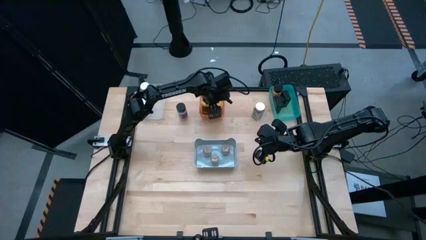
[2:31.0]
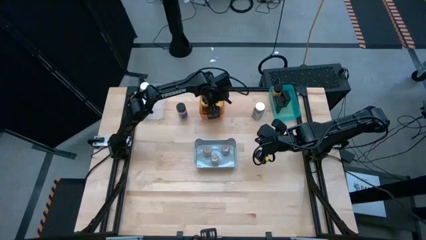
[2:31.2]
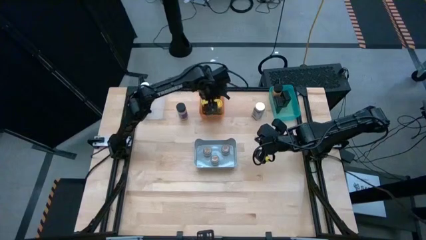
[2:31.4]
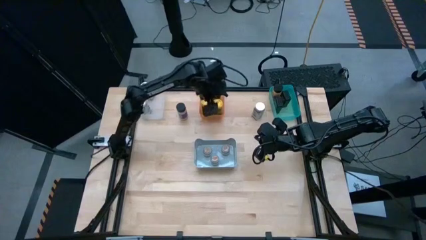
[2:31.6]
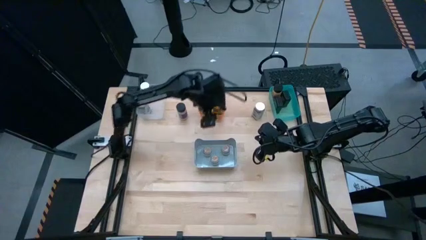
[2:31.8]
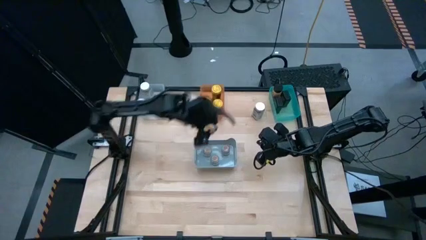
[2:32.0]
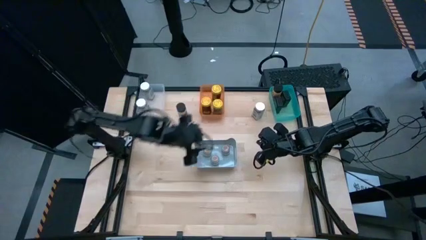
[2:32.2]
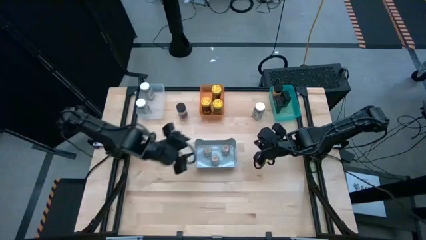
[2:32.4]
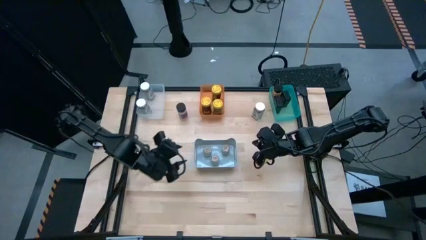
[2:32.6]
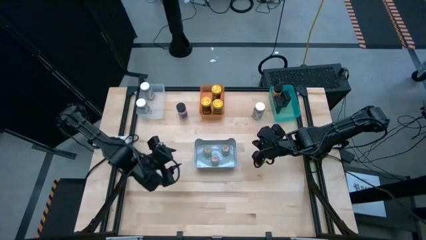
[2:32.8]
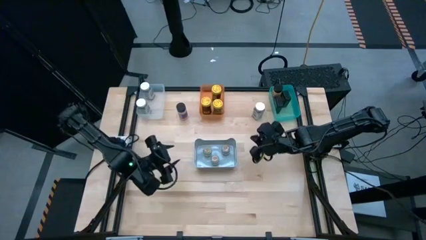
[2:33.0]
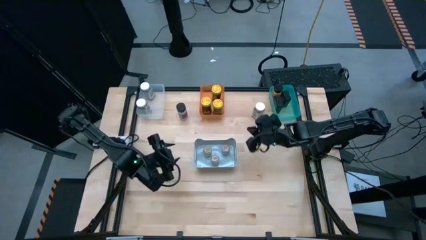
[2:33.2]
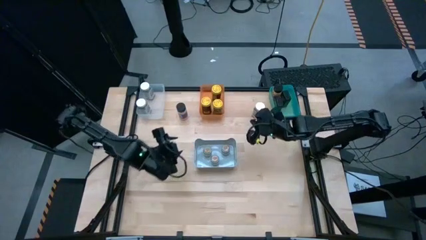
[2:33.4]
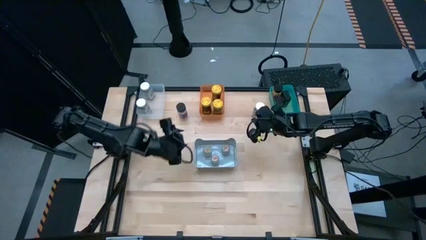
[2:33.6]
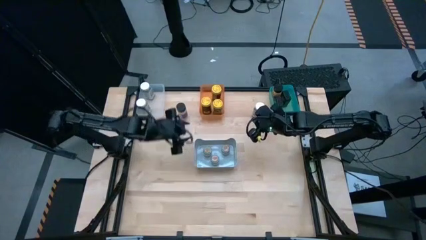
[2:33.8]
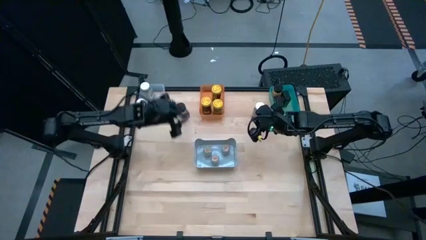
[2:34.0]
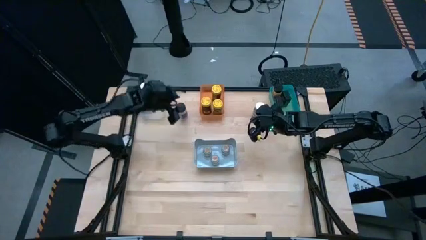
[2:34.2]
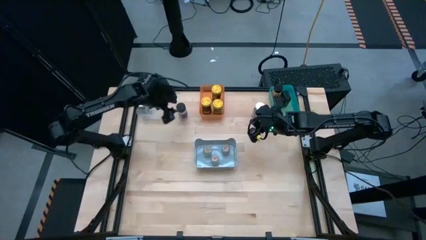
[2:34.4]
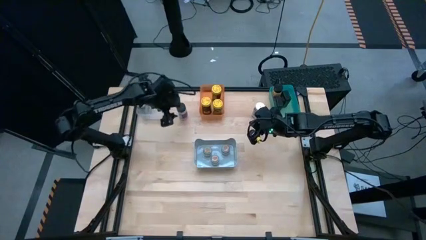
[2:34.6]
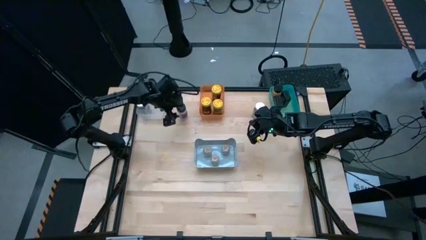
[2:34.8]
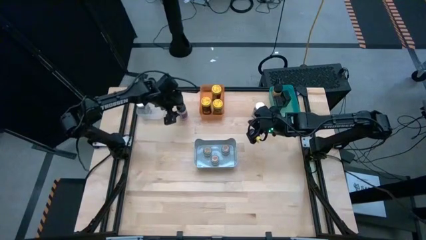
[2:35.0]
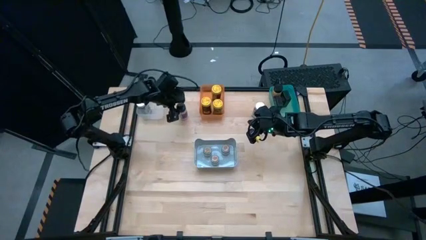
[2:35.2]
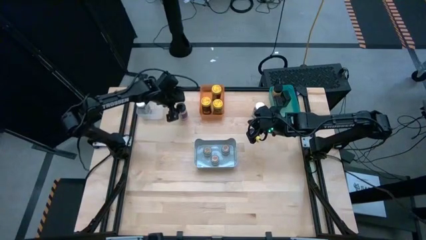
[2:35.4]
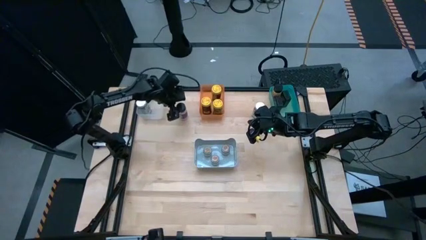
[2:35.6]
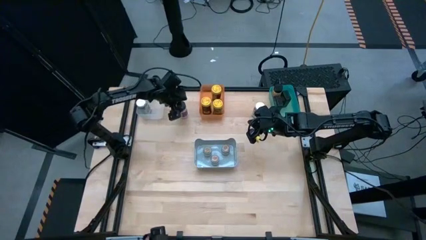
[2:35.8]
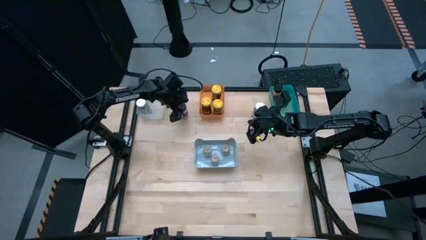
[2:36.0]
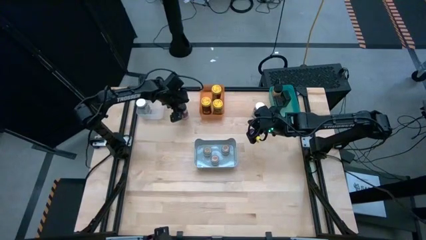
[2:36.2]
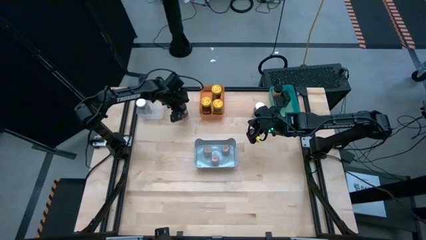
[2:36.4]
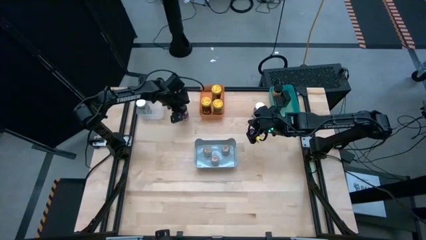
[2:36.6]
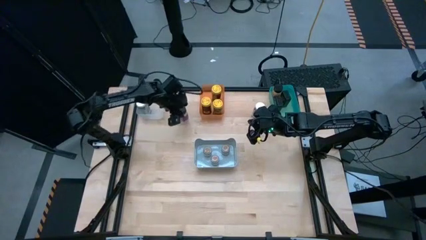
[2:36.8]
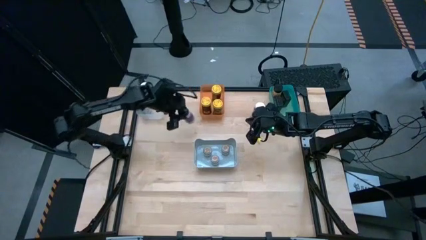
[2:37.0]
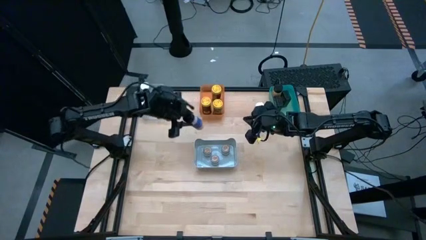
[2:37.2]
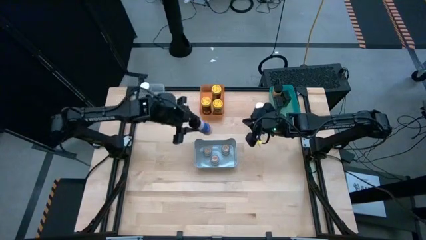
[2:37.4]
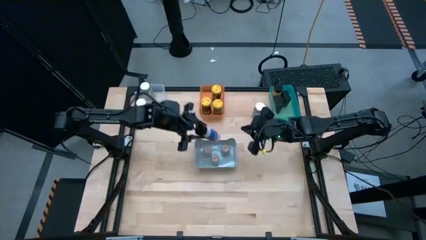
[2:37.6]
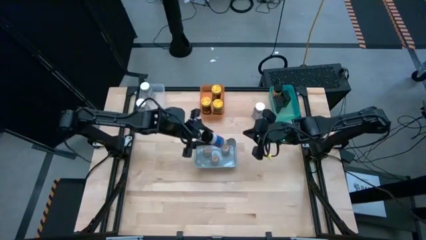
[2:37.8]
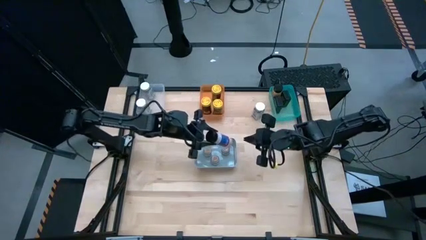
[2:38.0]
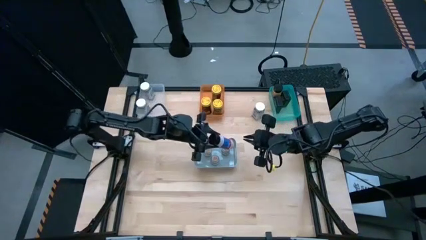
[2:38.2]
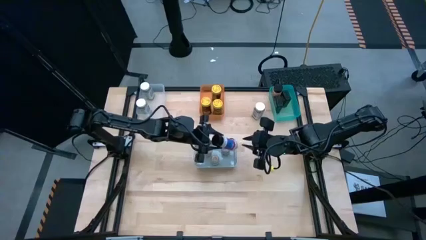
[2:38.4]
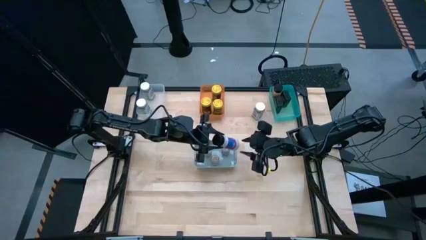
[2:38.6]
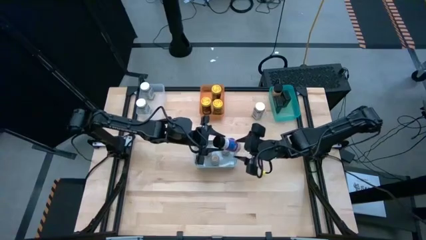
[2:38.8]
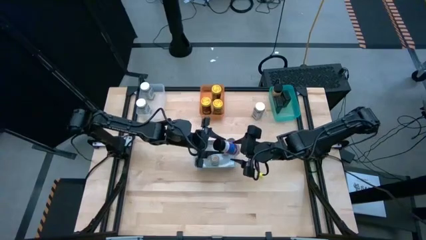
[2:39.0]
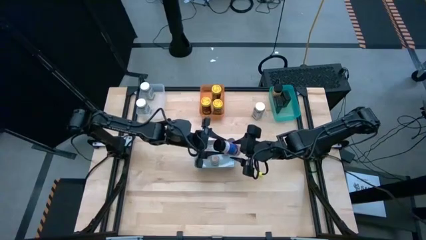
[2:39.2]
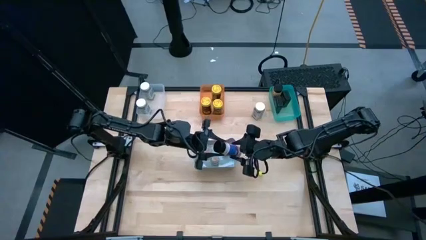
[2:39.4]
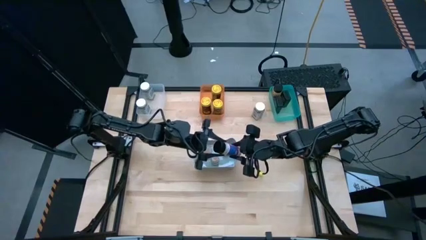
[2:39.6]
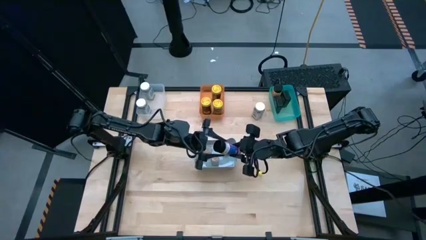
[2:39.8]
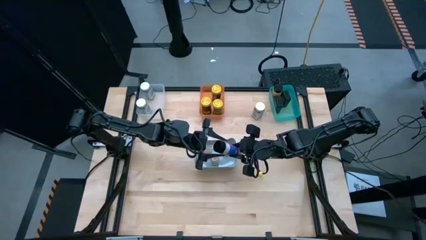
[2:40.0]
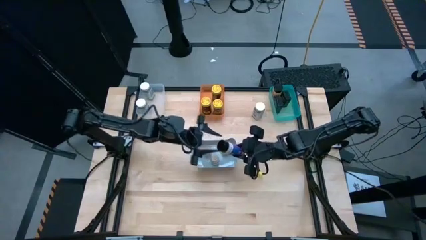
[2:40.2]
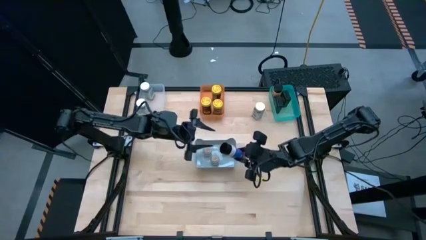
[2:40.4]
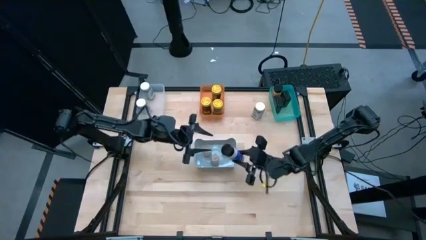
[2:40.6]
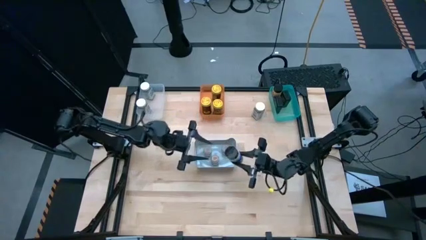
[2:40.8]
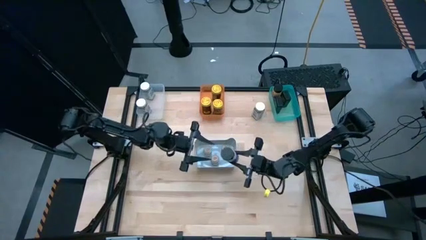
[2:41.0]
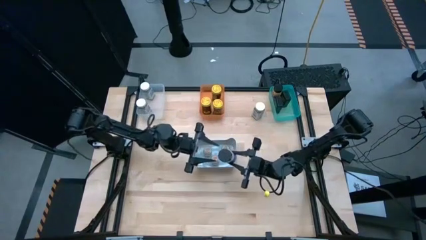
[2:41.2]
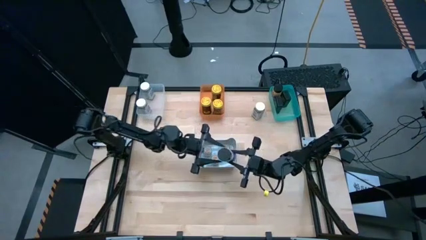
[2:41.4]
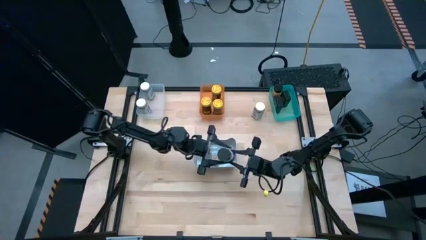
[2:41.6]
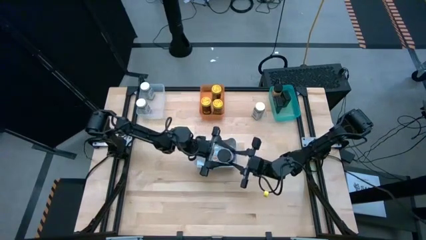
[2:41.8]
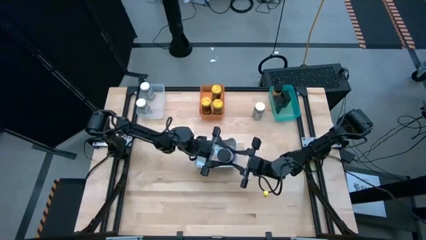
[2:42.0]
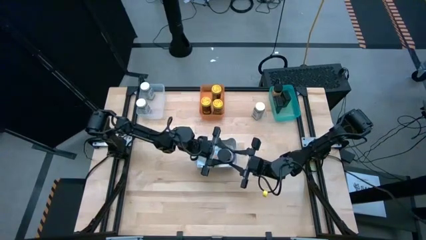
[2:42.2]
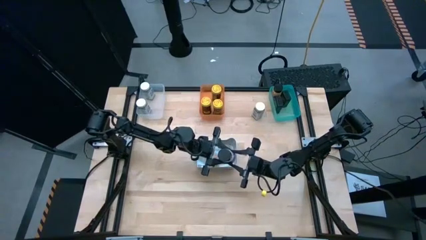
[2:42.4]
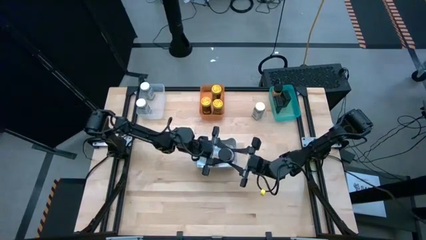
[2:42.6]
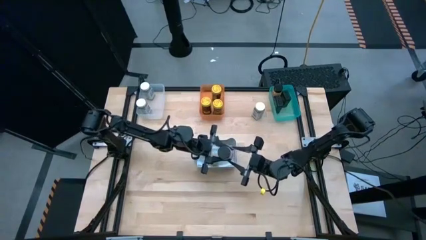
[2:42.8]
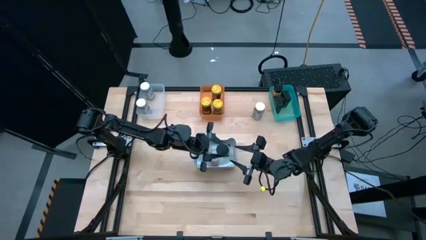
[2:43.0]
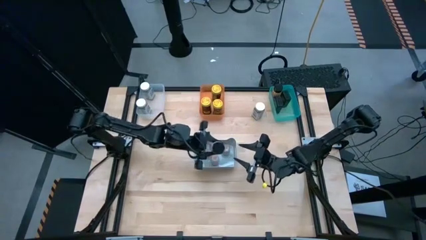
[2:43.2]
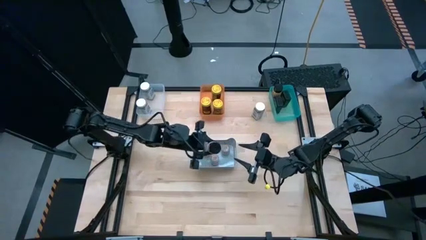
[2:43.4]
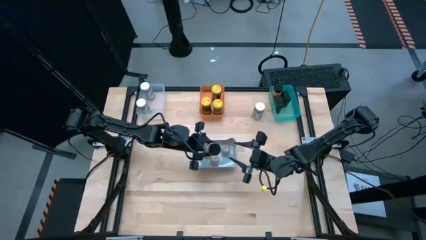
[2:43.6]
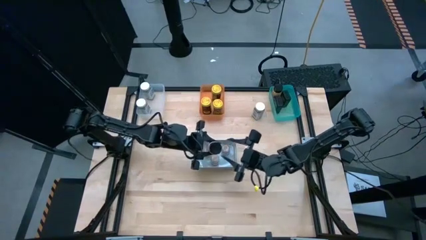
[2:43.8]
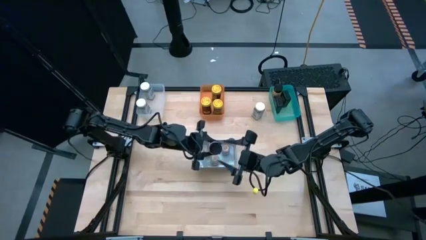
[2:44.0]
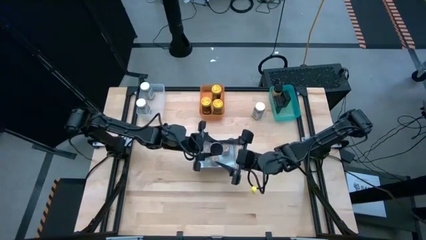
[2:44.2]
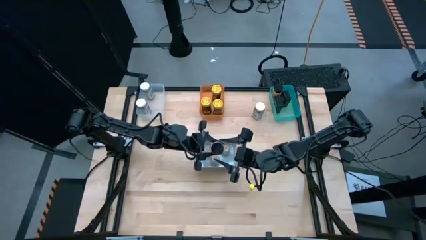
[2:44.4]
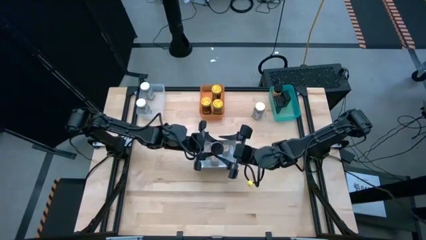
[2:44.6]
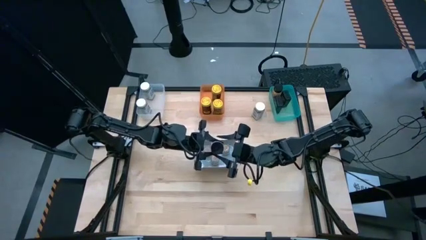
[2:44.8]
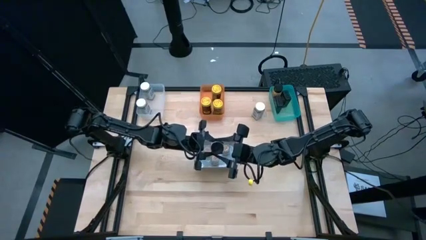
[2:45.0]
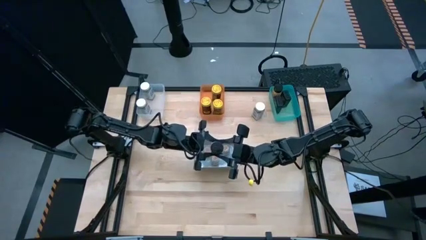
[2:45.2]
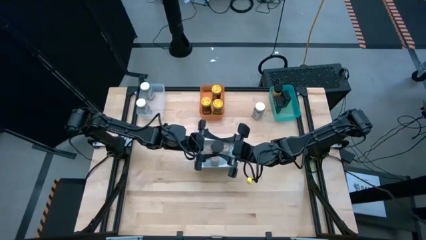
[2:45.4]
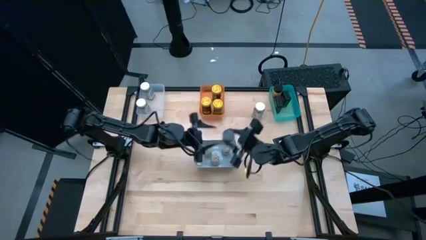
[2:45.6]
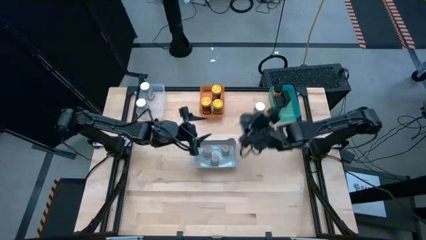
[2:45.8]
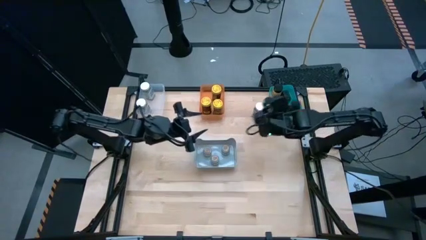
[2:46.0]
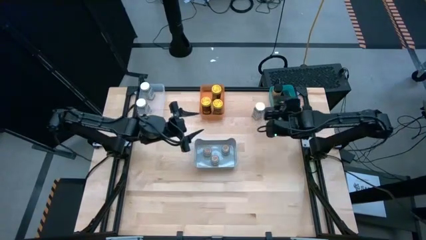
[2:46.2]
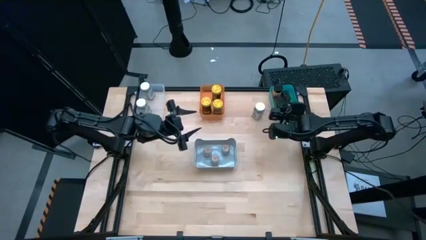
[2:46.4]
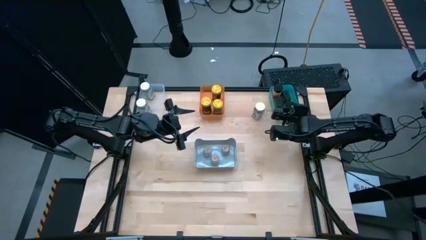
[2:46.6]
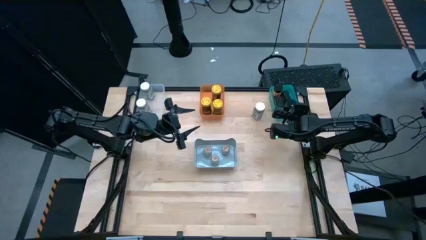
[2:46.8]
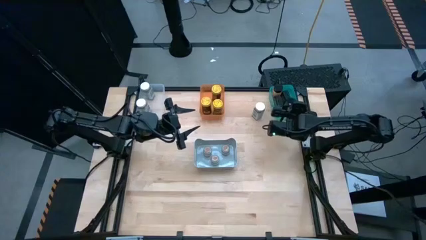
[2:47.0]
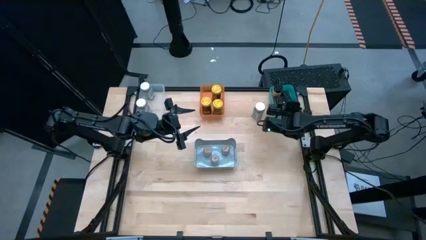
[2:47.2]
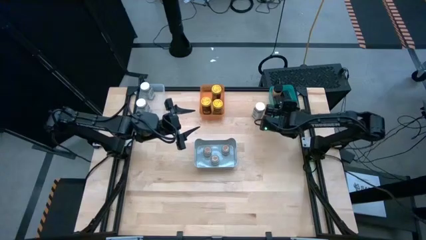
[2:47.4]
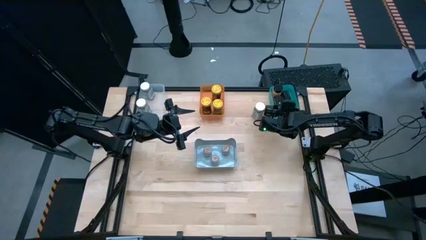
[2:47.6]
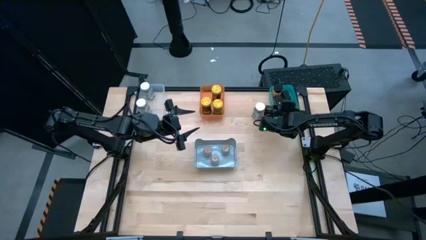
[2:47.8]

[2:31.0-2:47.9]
Task: Sort spices by type
Put the black seasoning bottle into the green bin
